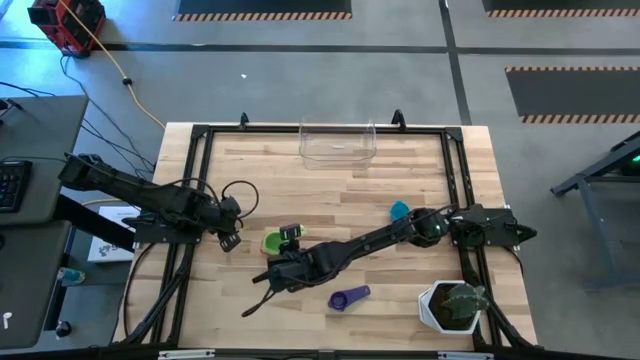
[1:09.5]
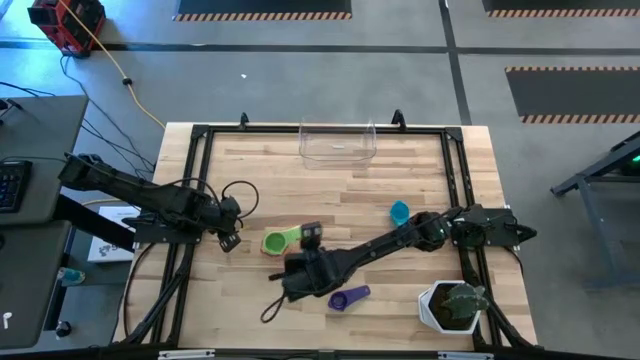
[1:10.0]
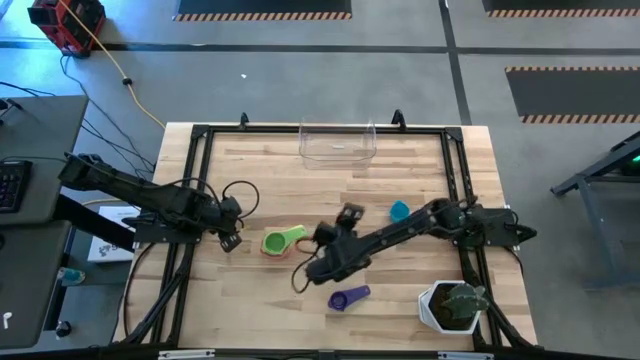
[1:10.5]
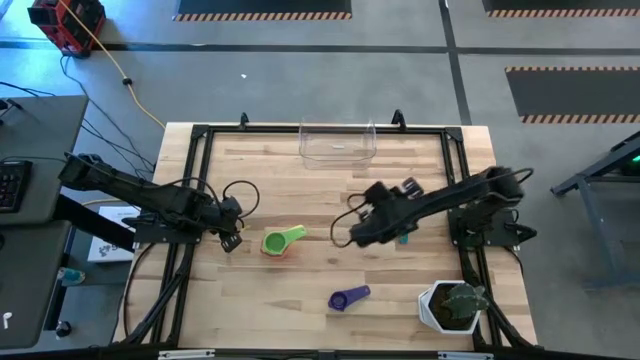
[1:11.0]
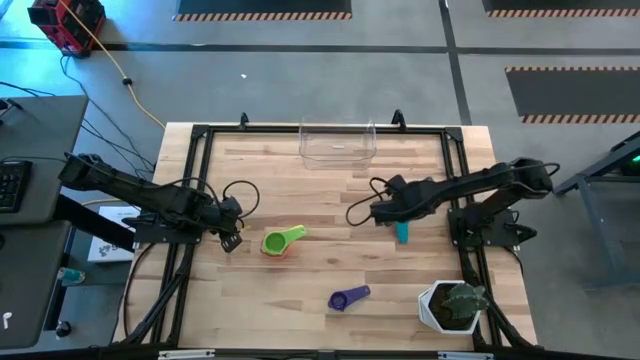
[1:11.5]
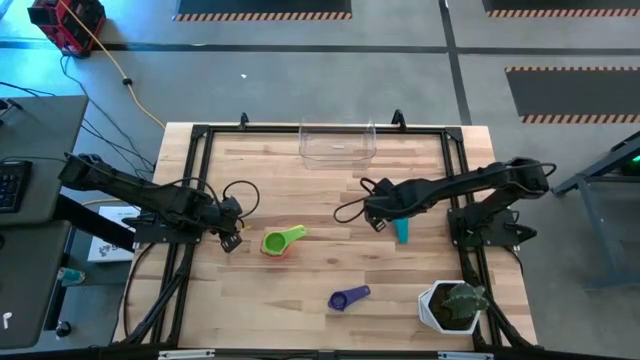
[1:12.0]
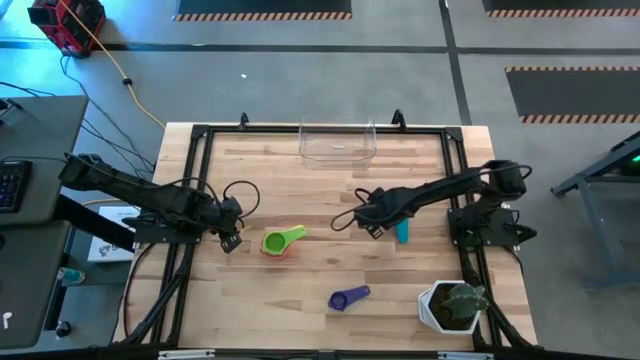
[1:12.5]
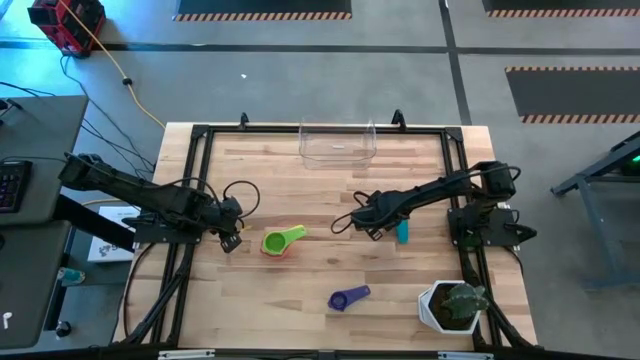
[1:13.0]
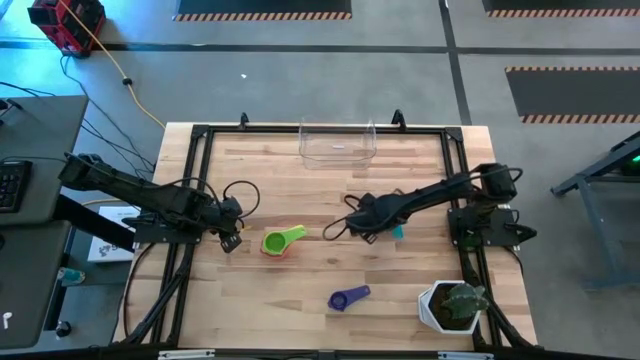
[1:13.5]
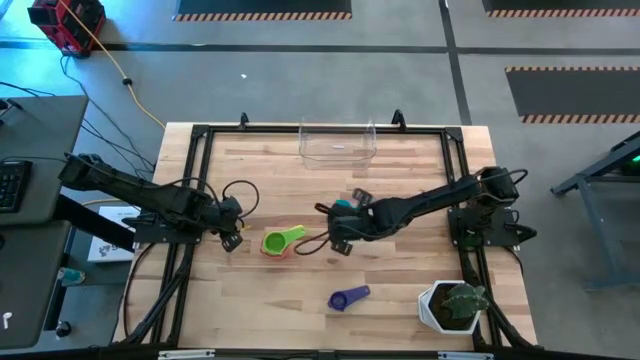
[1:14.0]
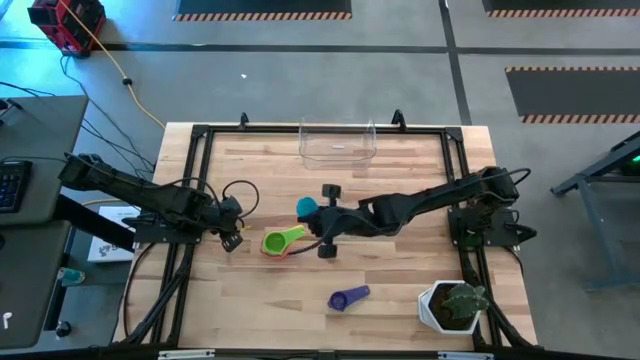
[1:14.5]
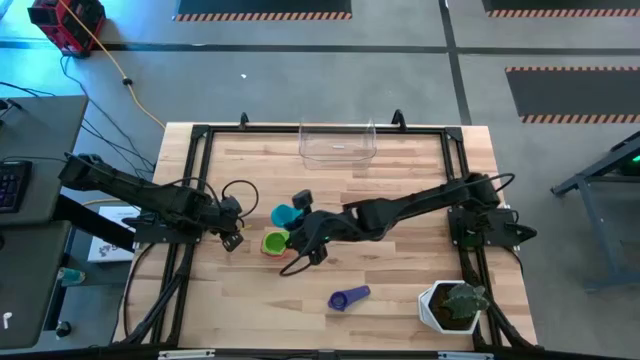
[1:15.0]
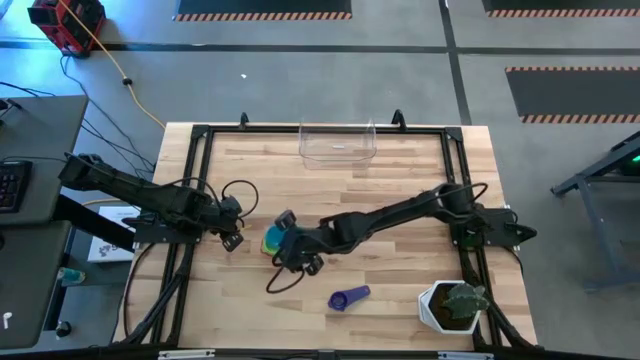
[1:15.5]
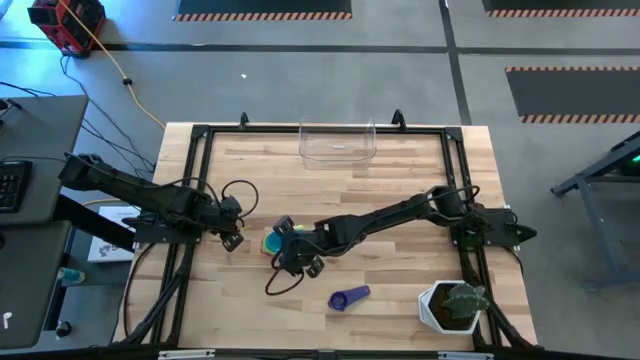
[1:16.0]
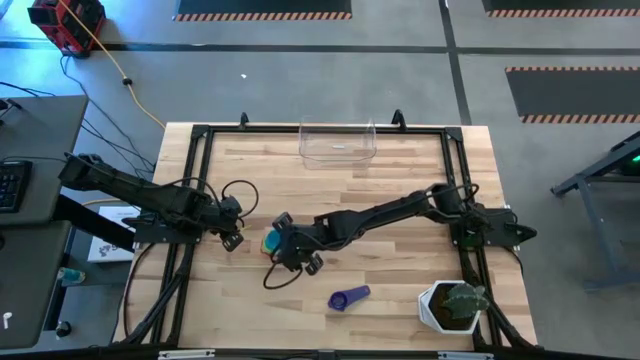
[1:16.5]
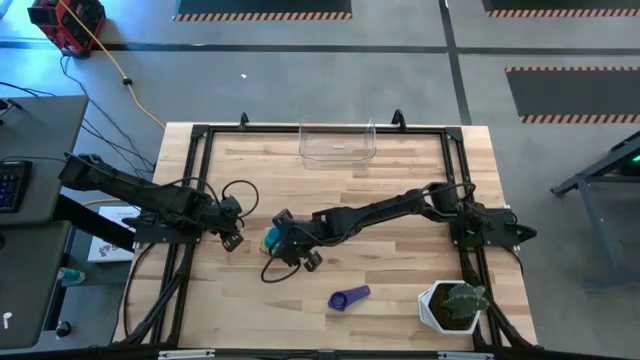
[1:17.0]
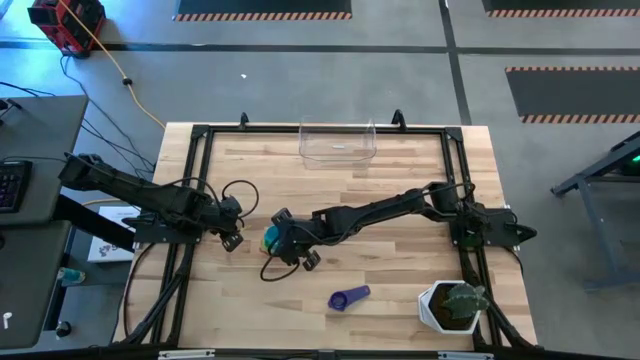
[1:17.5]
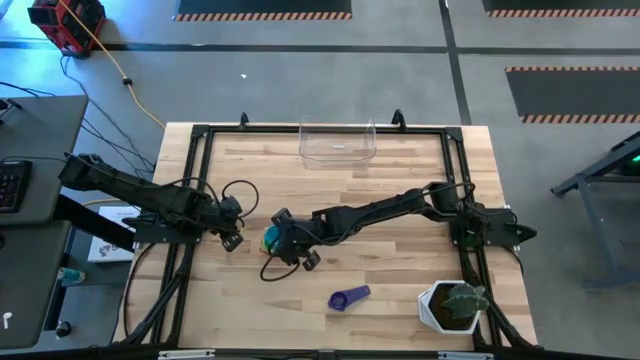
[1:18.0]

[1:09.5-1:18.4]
Task: Nest measuring cups in basket
Stack the light blue measuring cup into the green measuring cup

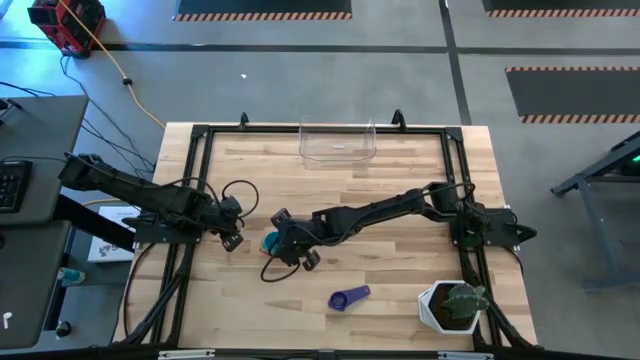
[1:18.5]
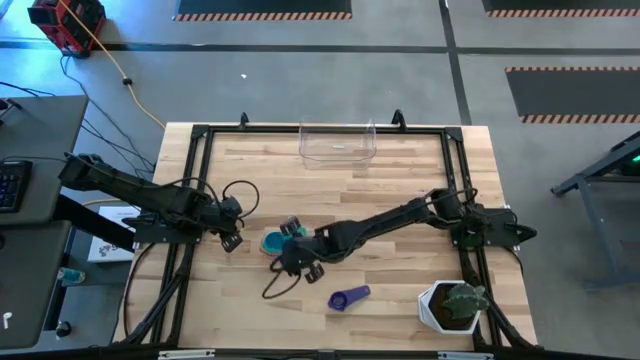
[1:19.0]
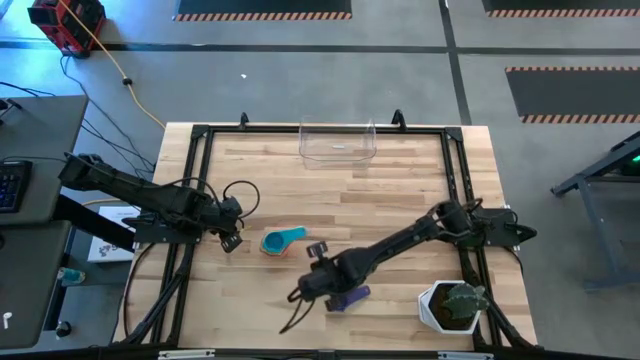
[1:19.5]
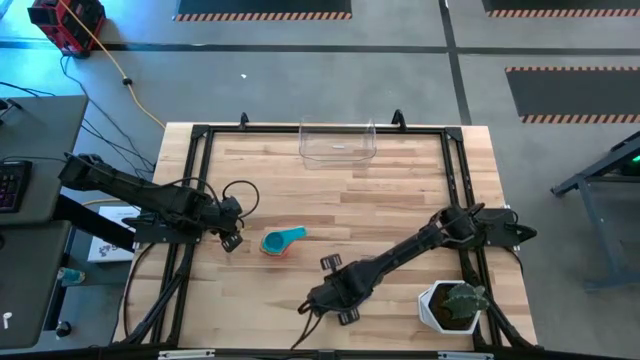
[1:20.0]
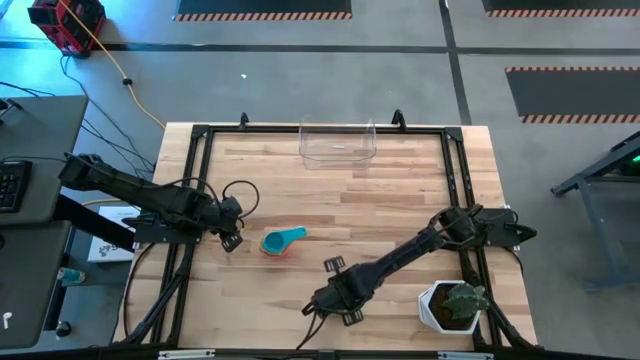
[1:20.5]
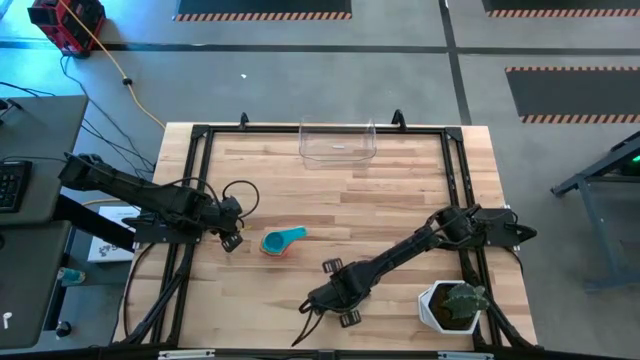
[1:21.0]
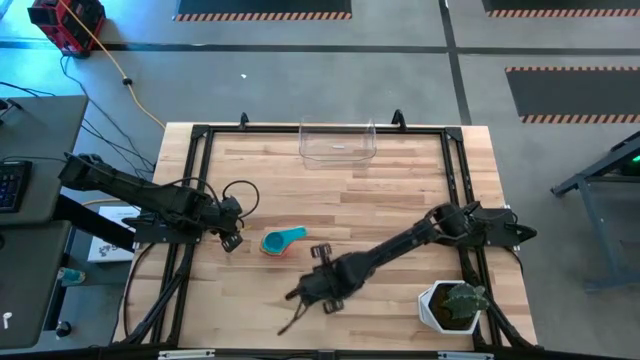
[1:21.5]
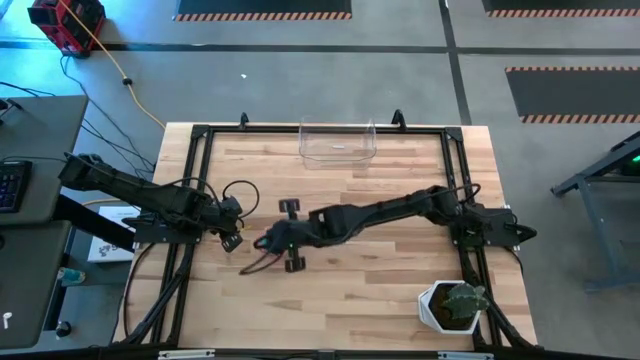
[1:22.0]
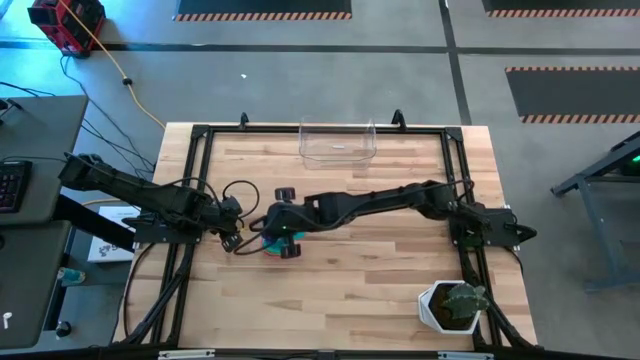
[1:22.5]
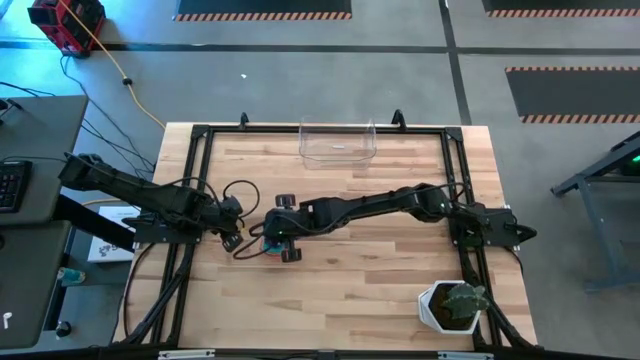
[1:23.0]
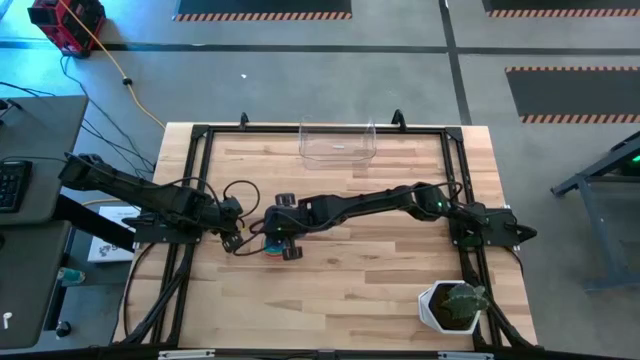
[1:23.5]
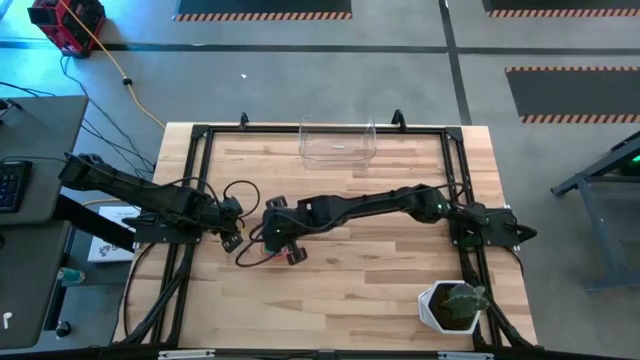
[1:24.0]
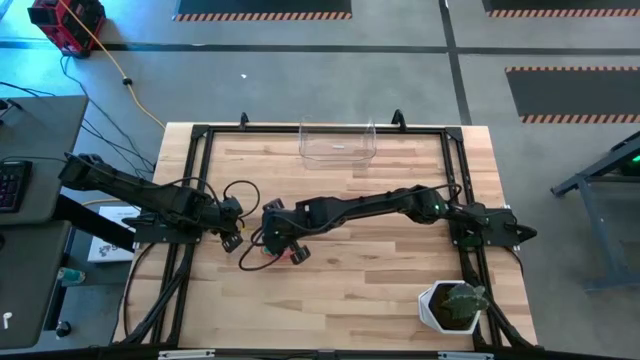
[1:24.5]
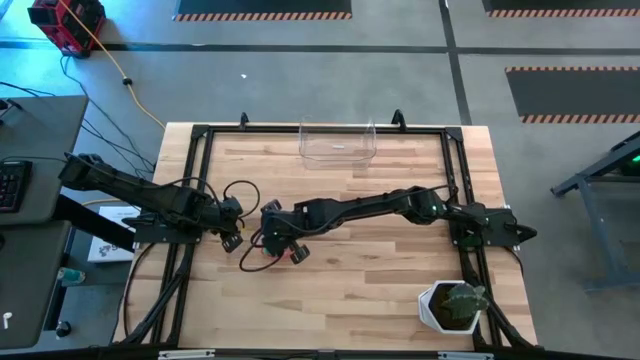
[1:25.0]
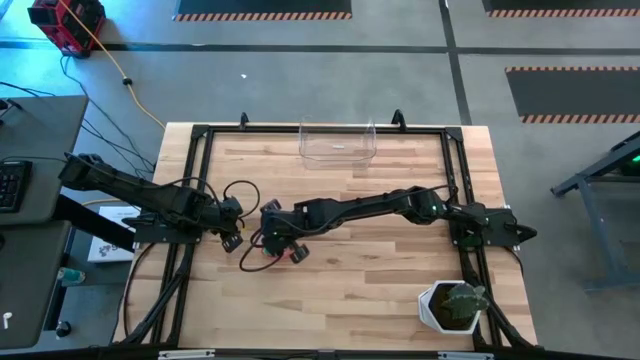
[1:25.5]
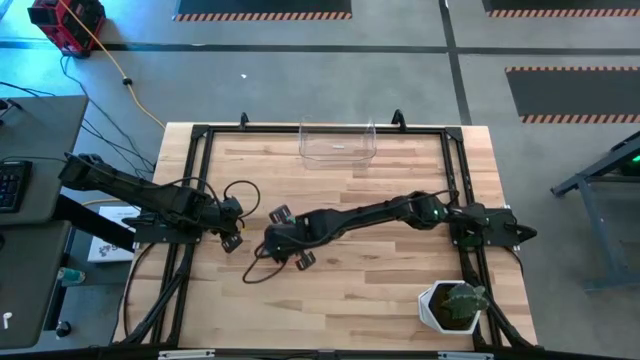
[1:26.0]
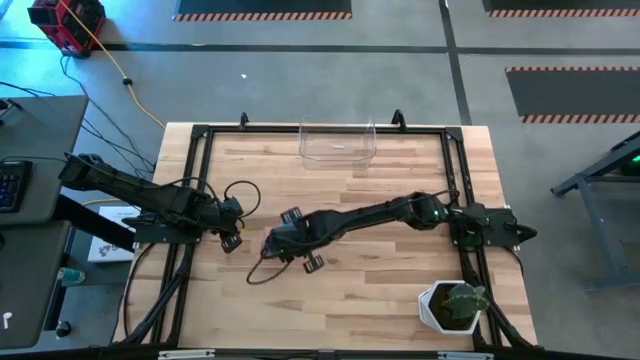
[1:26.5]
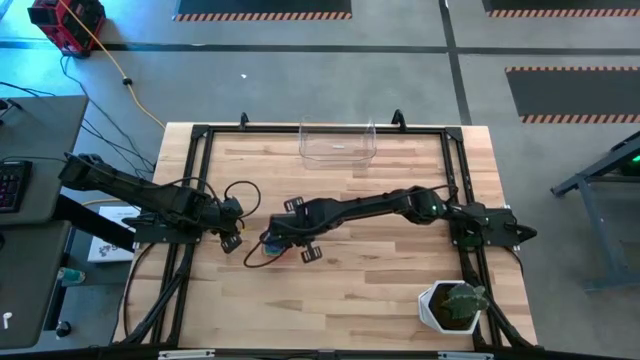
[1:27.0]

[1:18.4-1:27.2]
Stack the purple measuring cup into the blue measuring cup

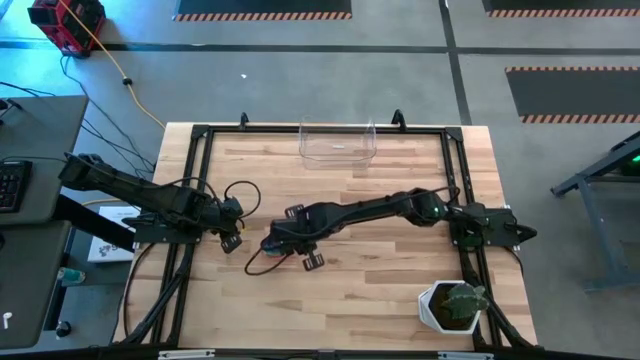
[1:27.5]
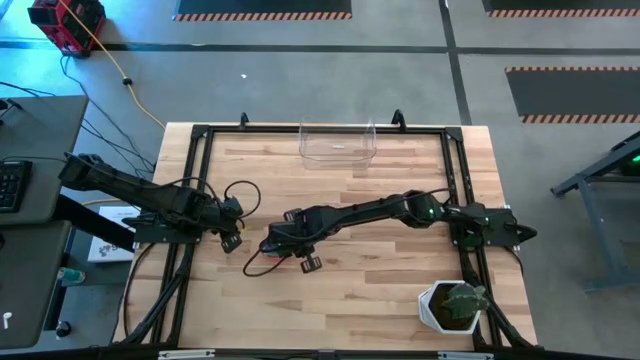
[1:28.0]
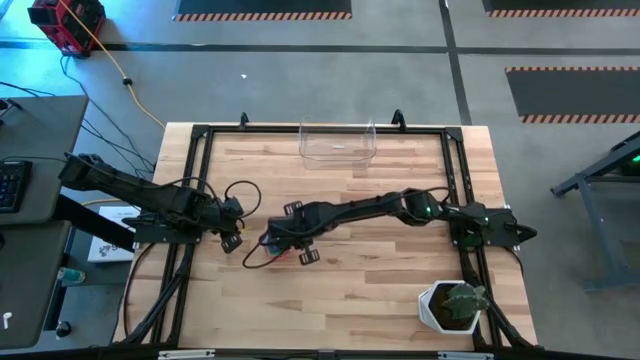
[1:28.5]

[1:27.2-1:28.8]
Adjust the nested measuring cups
